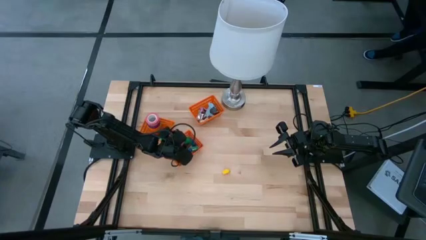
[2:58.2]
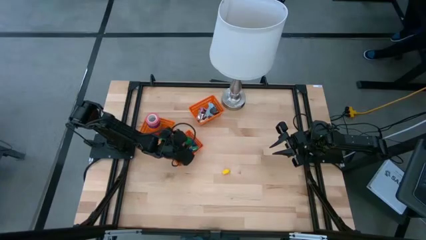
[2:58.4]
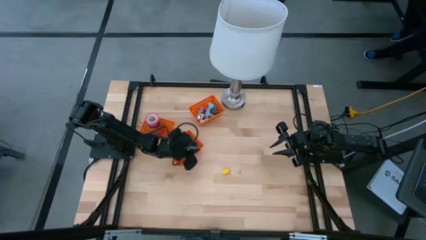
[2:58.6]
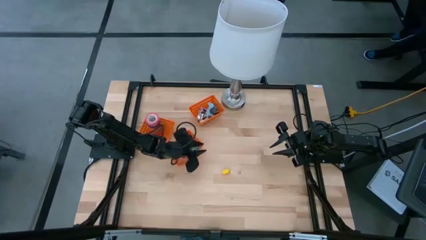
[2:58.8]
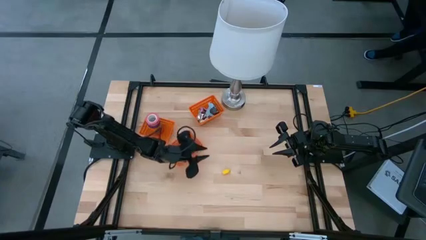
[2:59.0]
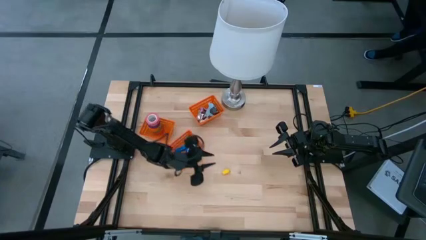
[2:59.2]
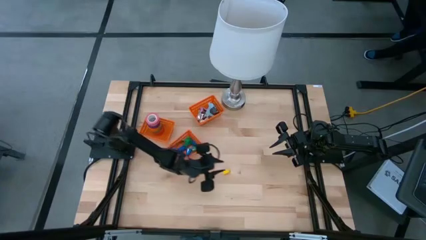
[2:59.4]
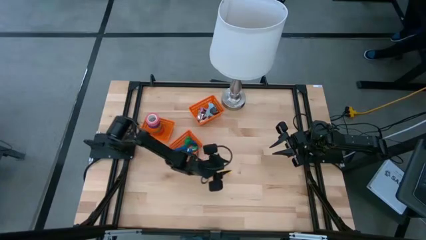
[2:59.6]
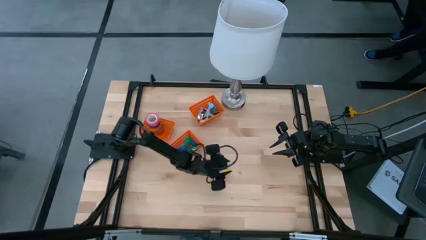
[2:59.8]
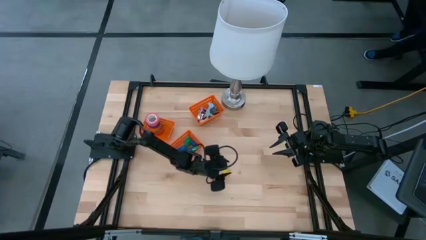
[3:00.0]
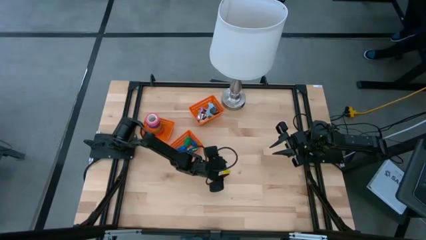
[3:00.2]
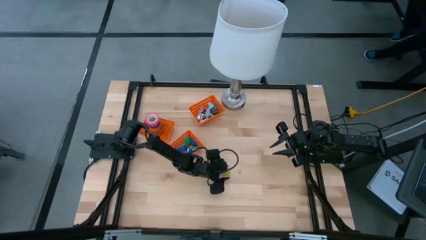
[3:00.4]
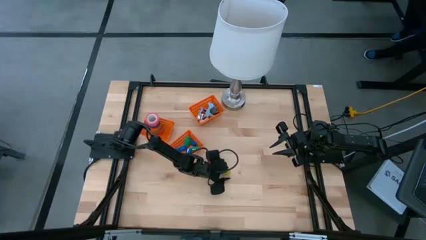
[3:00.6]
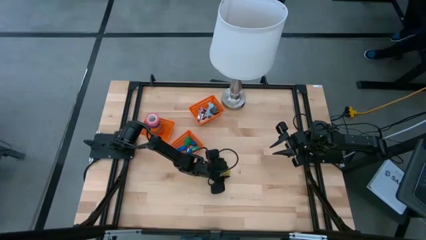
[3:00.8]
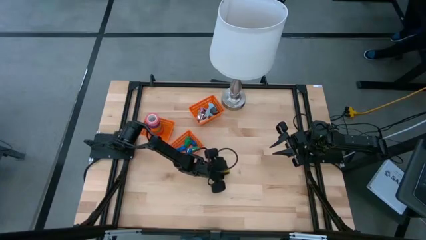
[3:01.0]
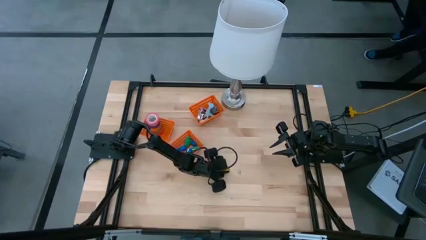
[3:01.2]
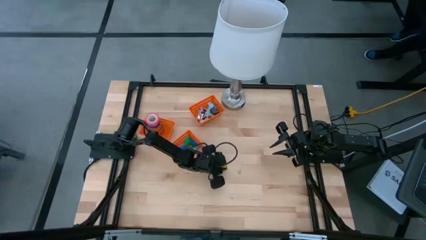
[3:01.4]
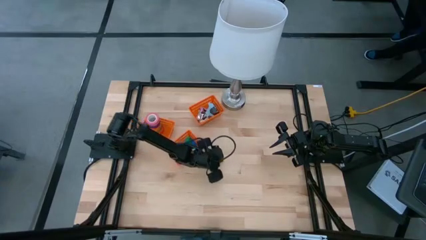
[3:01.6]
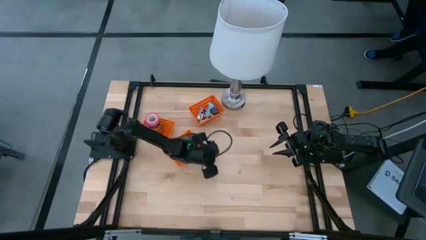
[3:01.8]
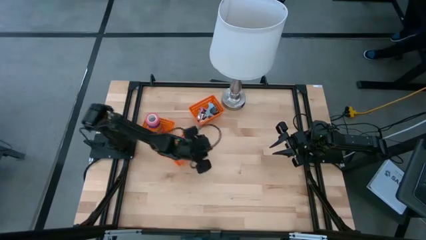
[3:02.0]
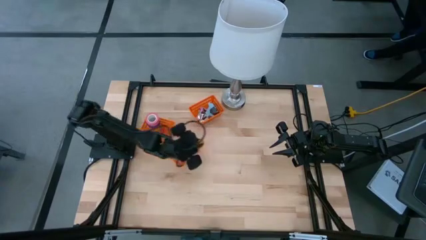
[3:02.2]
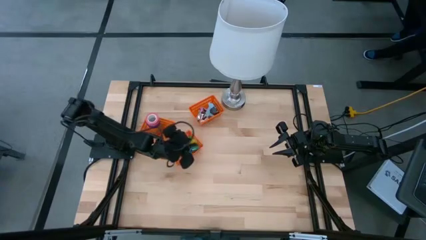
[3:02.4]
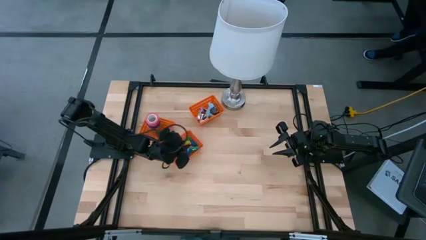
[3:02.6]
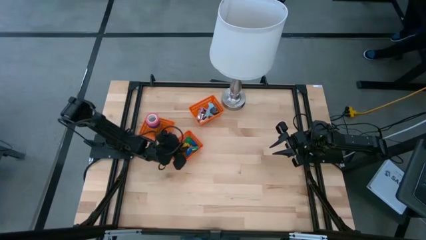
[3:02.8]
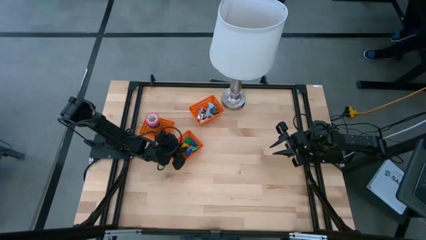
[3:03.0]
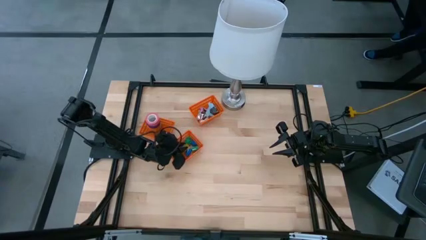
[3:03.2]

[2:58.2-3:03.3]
Task: Pick and place Stapler, Stapler remover, tape
Put the yellow stapler into the bottom orange bin

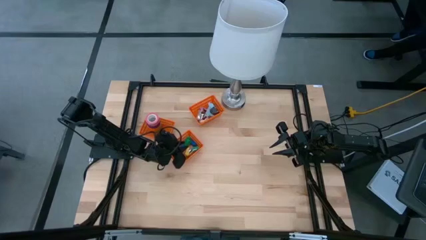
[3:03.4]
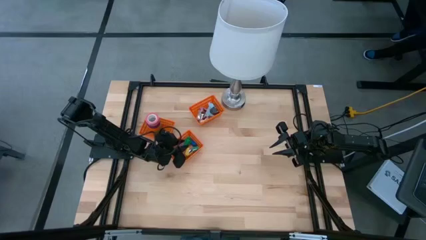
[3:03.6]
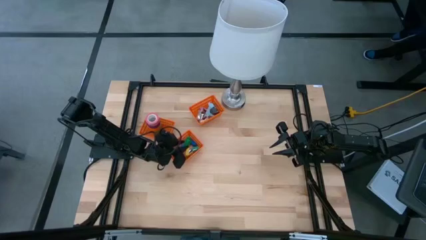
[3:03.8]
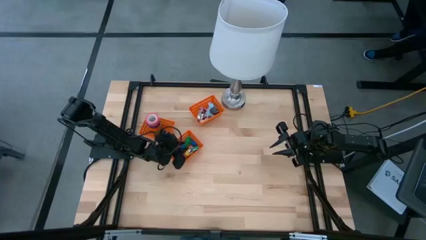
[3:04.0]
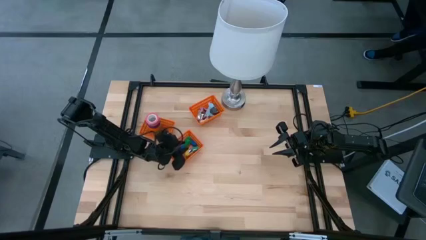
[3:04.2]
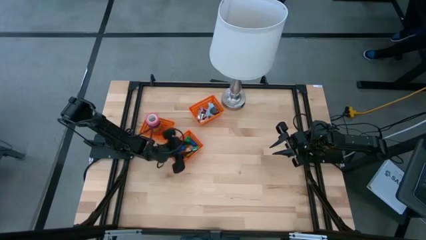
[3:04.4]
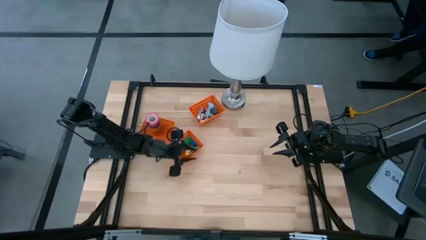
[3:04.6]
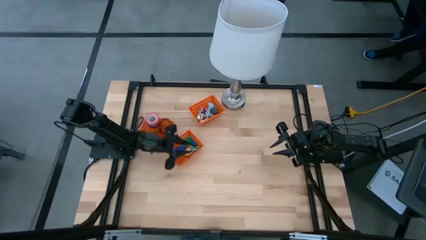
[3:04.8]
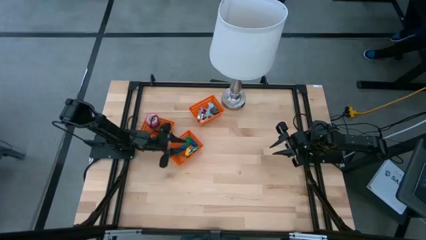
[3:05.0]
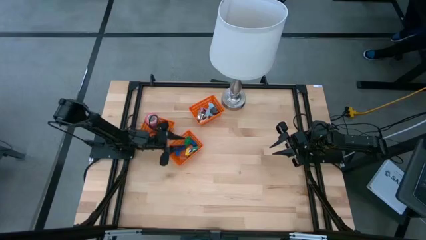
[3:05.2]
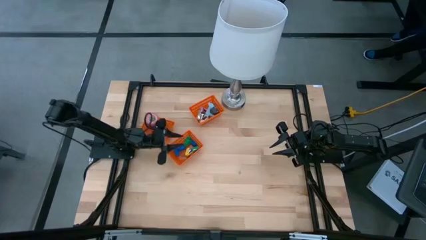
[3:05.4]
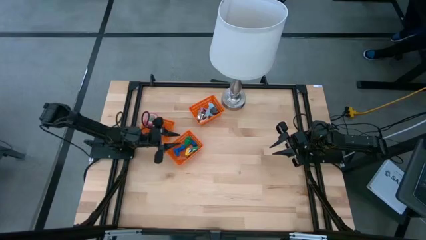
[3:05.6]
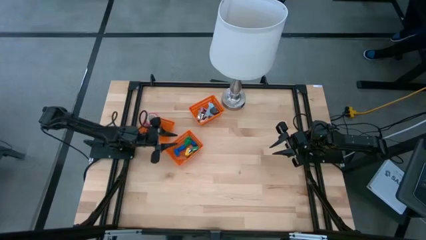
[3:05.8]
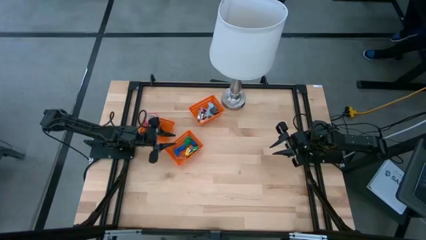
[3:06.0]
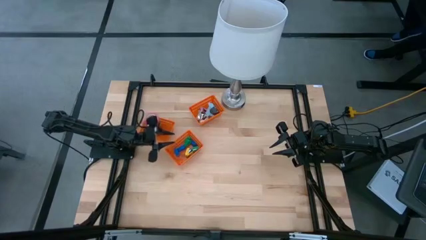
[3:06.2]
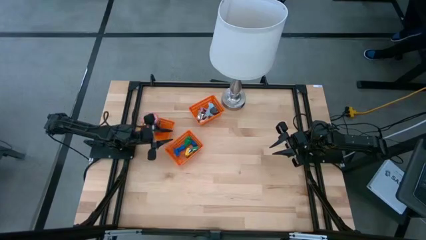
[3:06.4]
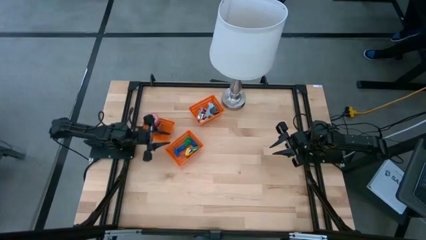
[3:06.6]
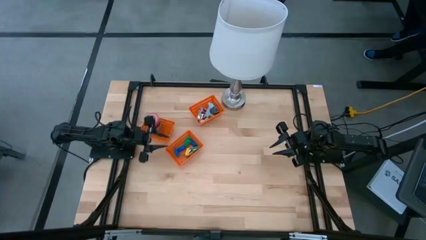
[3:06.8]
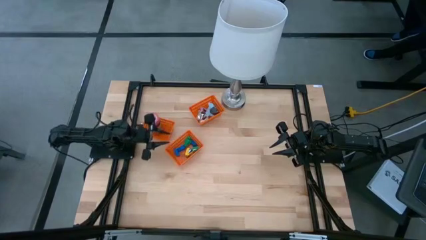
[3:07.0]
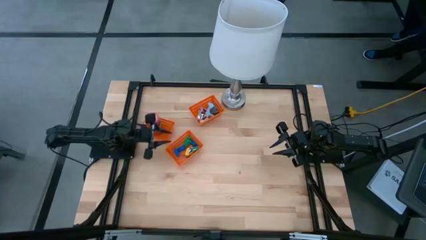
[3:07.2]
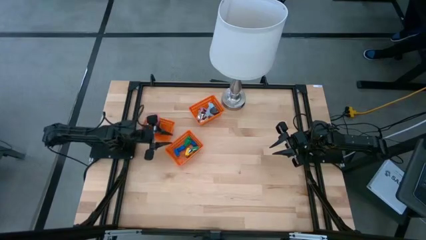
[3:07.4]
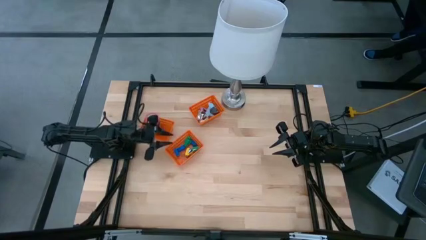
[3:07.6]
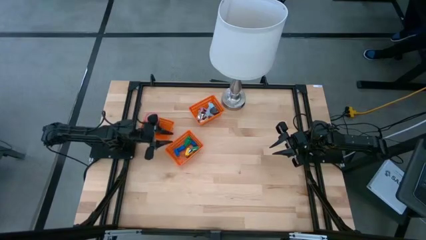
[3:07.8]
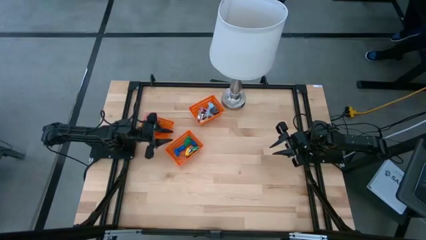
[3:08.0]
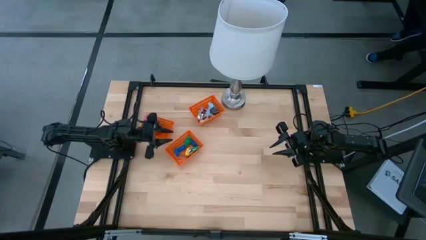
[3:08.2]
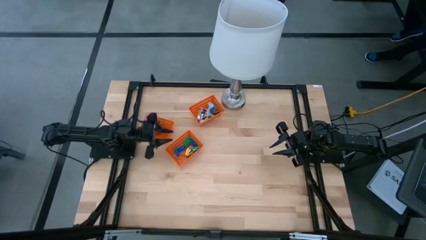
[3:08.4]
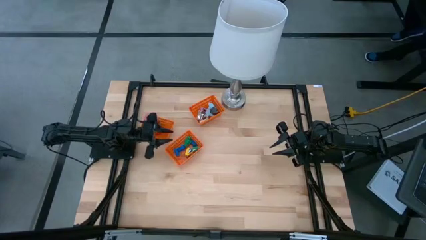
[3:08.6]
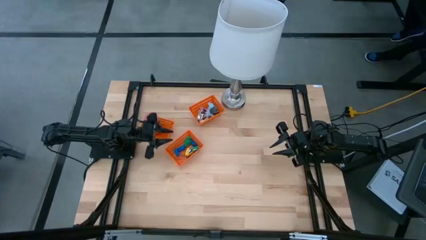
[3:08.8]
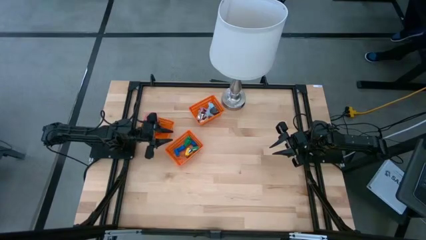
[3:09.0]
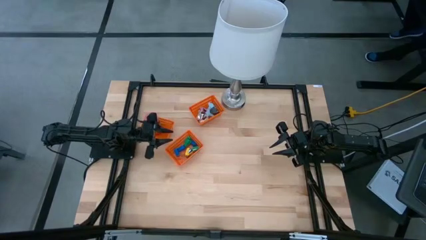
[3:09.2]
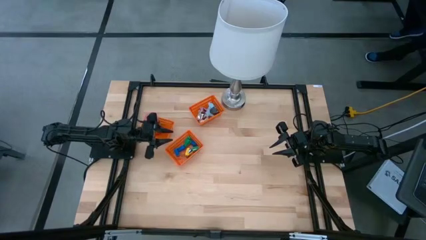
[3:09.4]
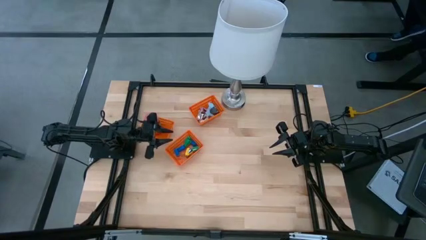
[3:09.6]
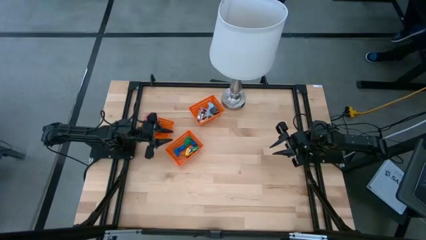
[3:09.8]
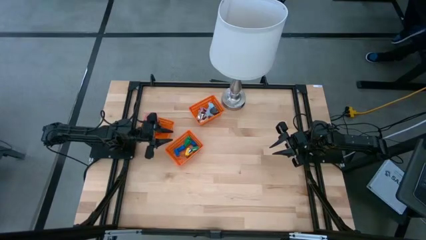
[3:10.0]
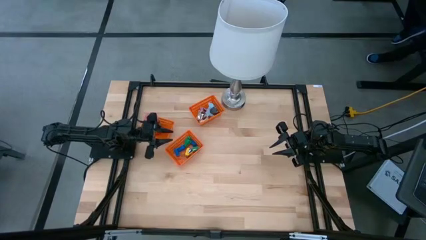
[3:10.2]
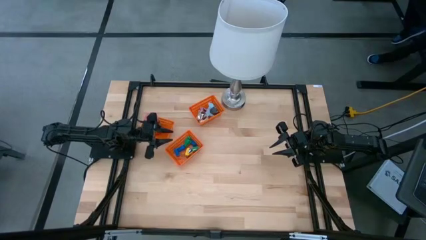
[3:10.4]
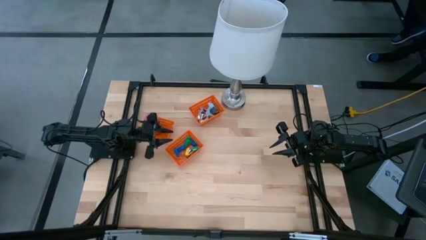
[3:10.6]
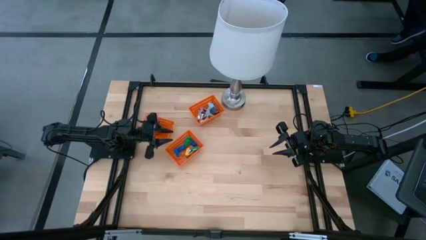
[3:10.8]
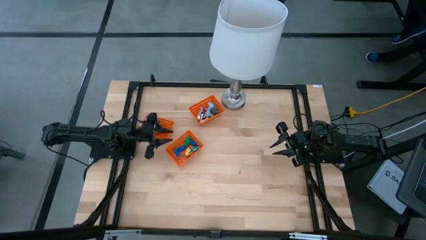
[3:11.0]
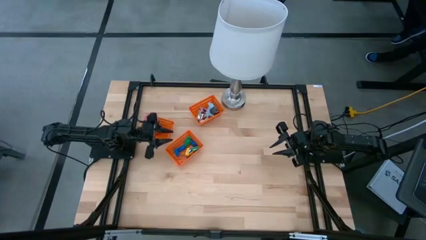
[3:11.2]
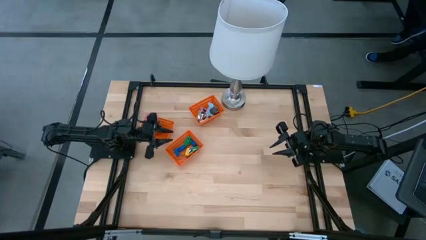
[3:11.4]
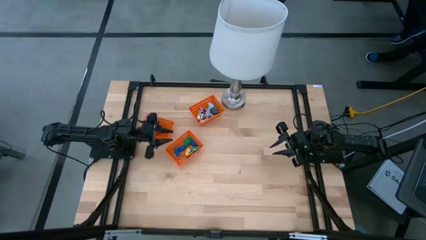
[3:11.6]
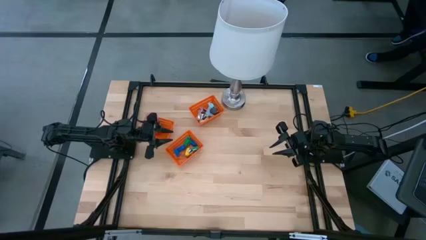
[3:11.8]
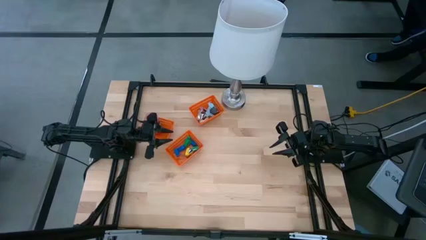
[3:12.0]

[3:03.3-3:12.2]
Return to Home Position

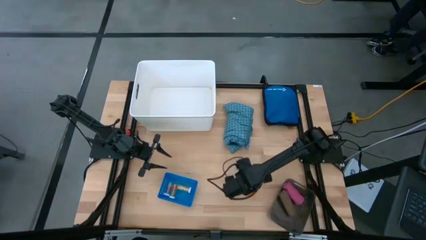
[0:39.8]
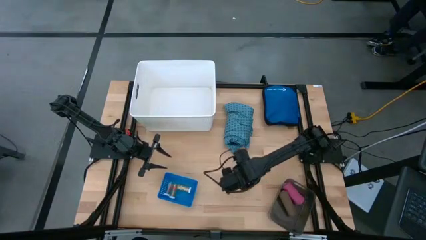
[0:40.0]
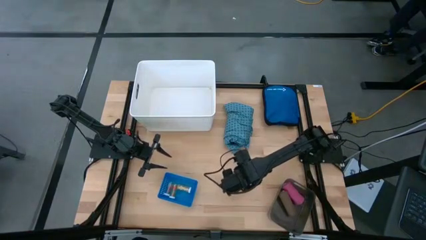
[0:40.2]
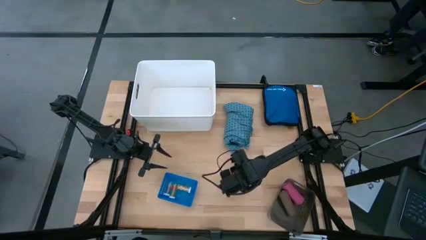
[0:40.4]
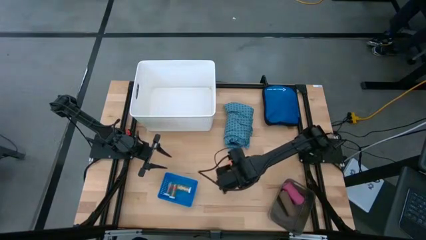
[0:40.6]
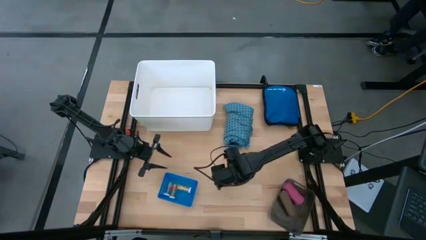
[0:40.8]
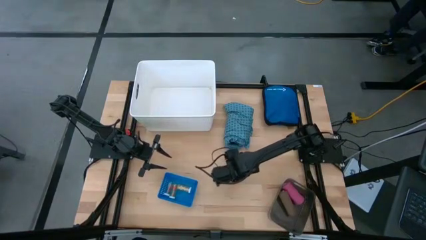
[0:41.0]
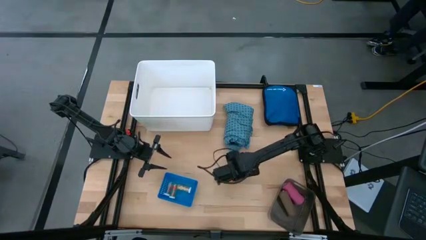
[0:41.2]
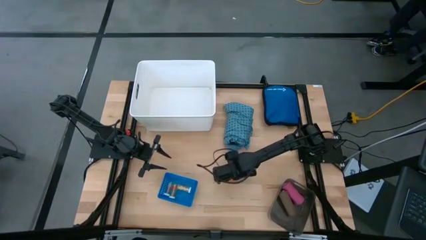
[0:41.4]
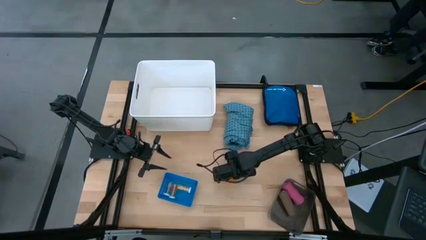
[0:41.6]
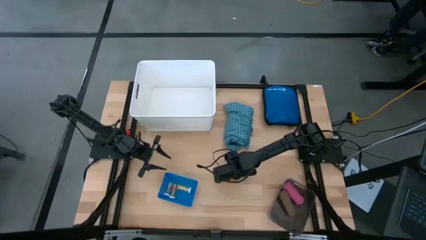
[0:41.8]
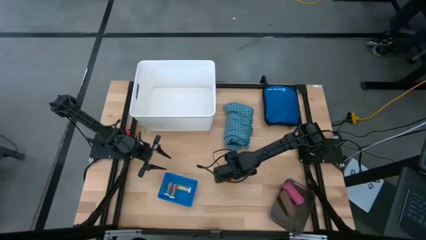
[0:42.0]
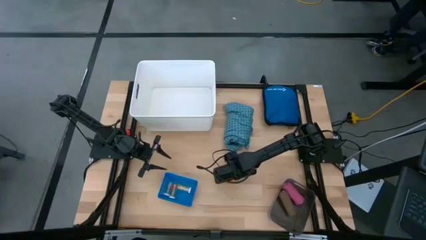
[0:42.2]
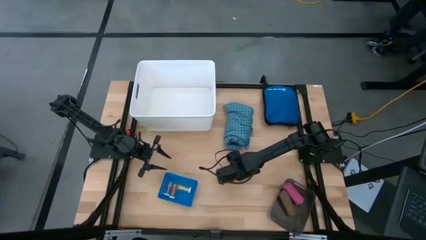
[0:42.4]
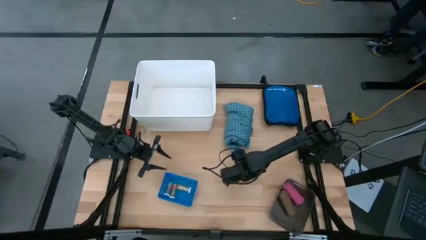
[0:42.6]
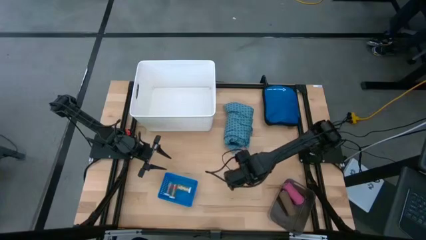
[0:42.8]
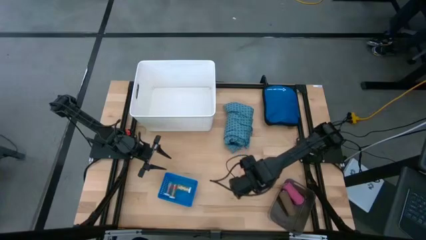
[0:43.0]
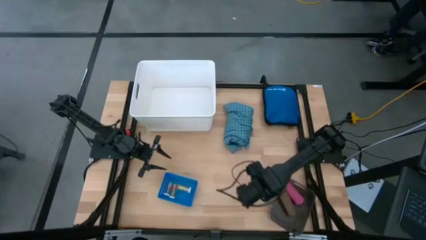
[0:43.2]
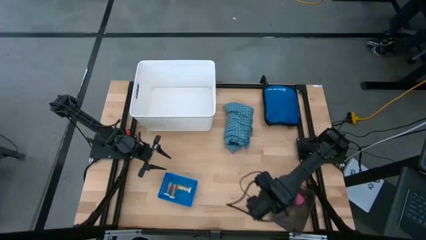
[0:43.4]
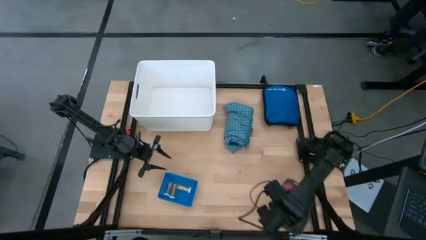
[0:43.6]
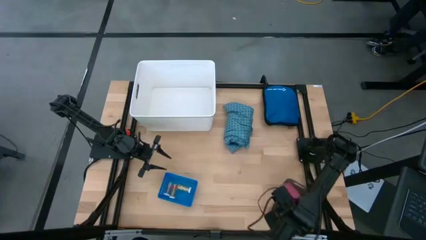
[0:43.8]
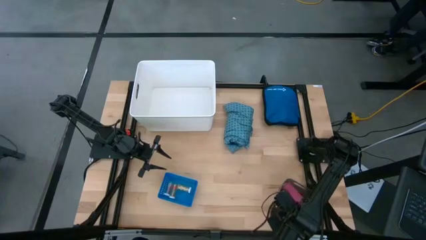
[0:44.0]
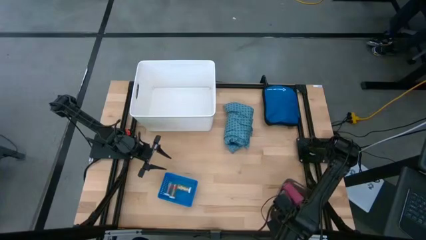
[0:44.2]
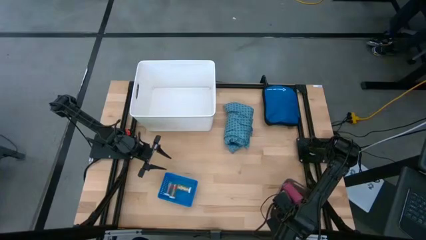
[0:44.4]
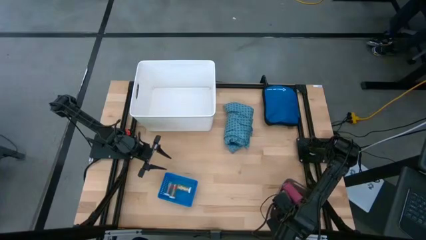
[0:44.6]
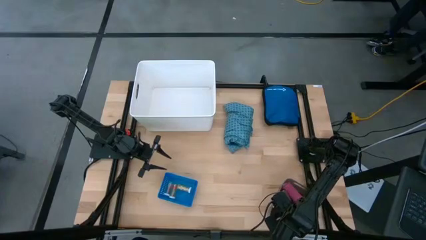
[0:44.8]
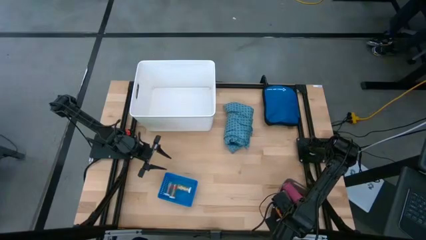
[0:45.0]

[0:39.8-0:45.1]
Task: Pick & Place Medicine items
Put the orange bandage into the black bin
